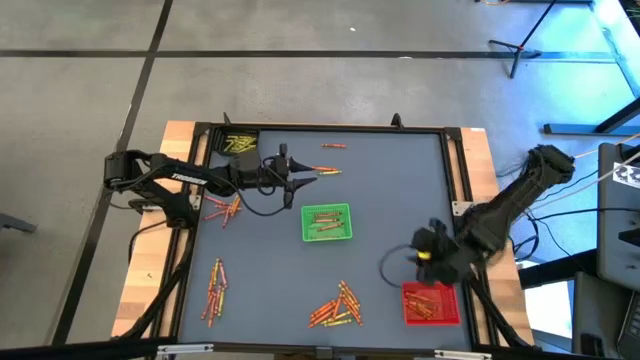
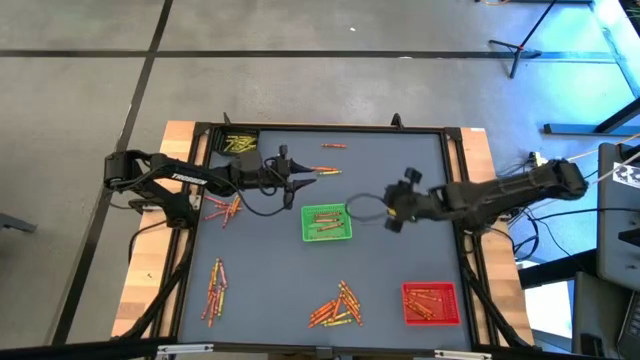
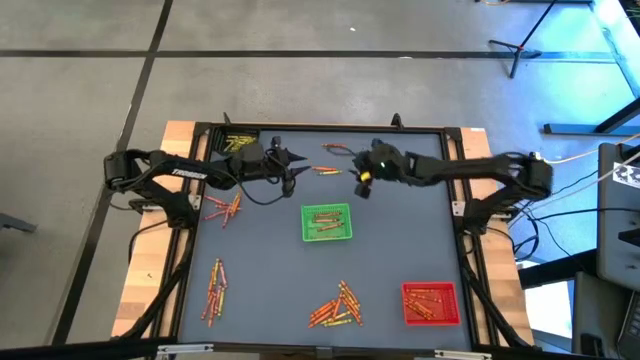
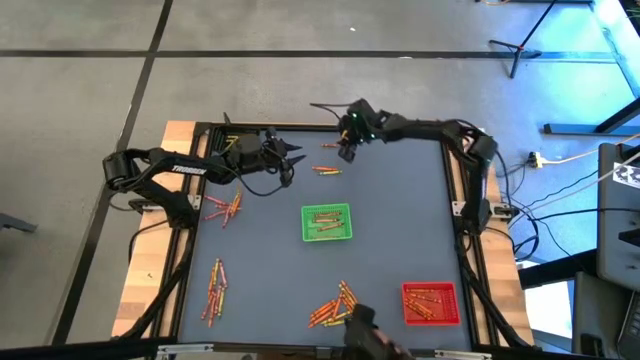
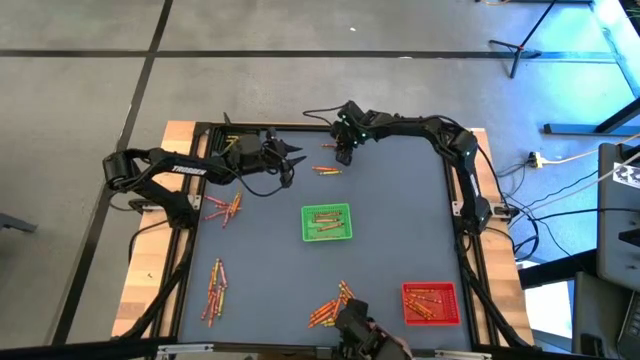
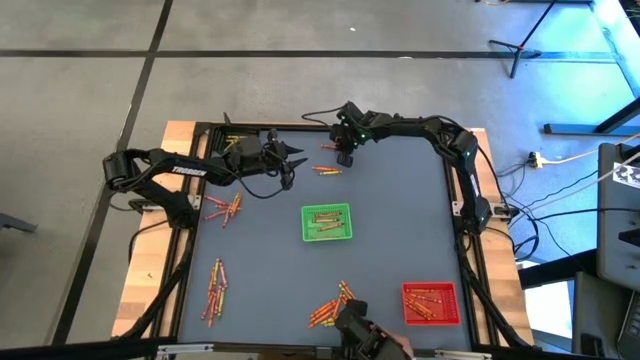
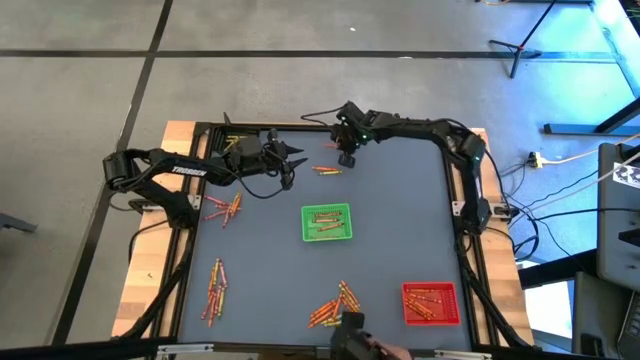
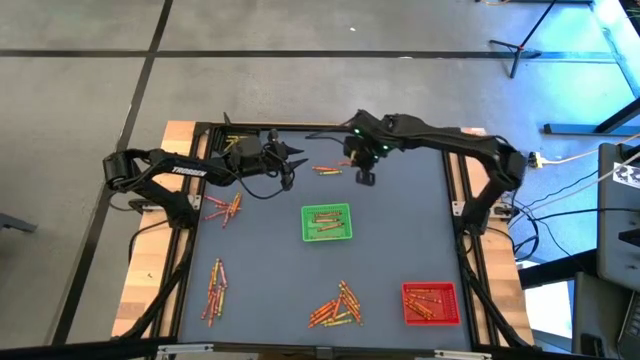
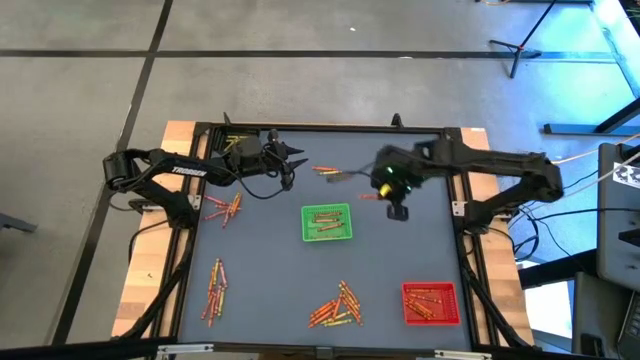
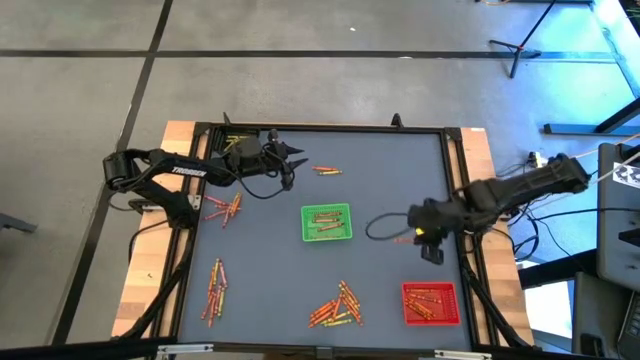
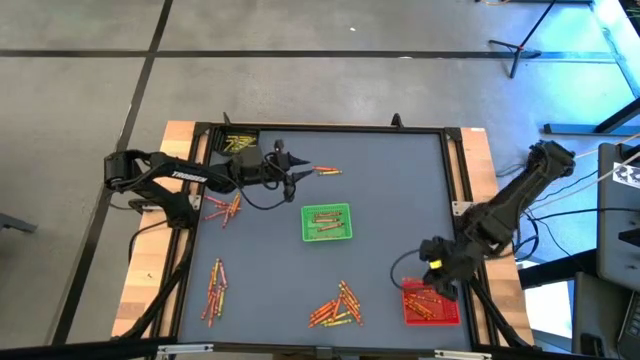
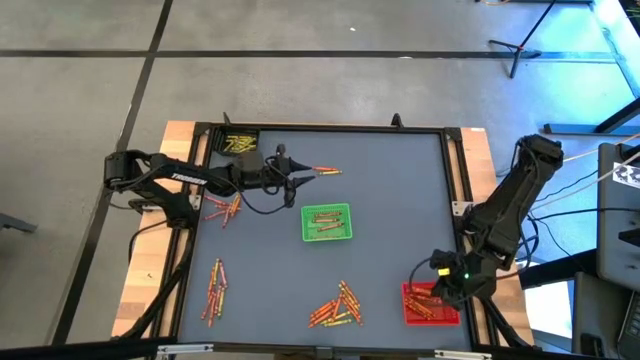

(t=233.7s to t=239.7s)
Task: Sort crayons
Put the orange crayon into the red bin

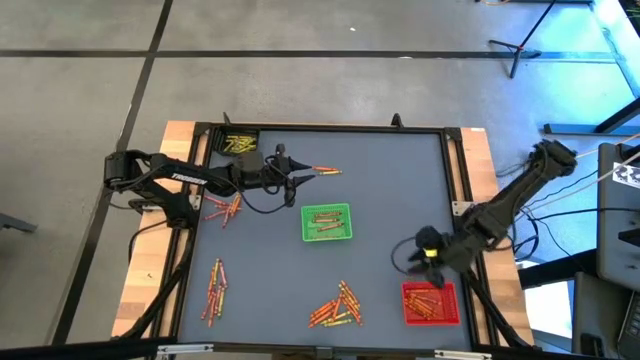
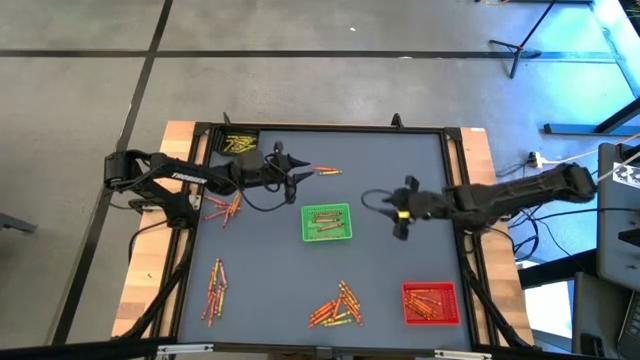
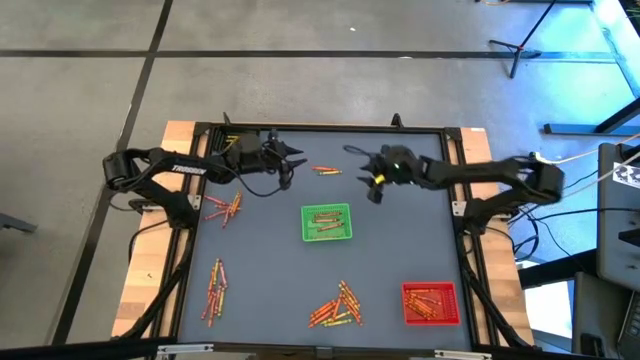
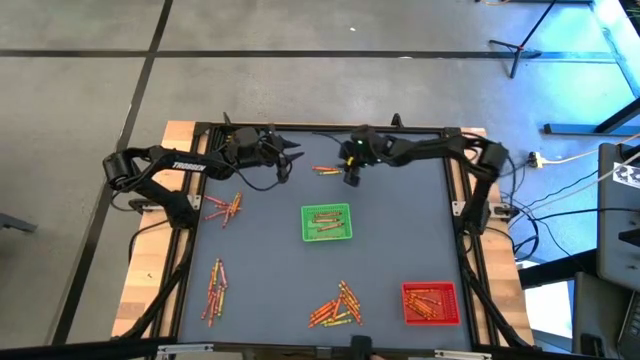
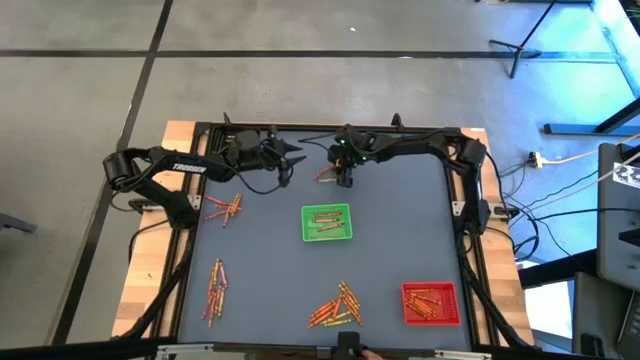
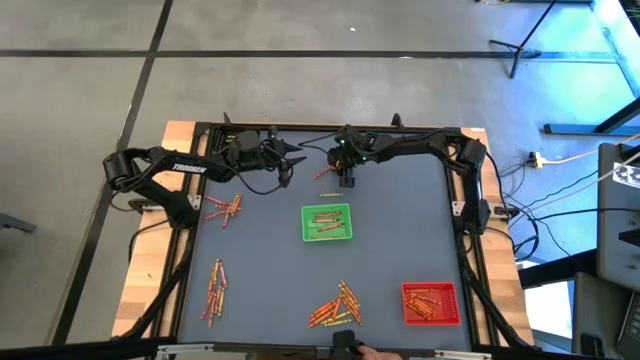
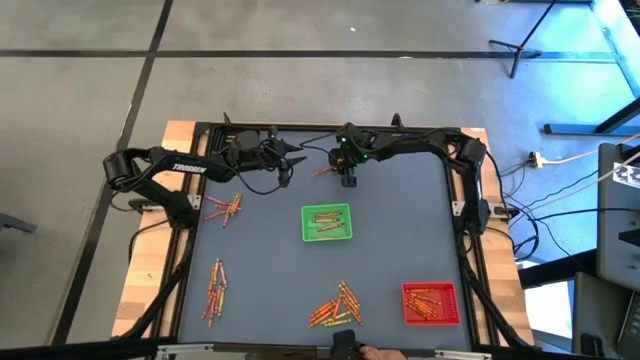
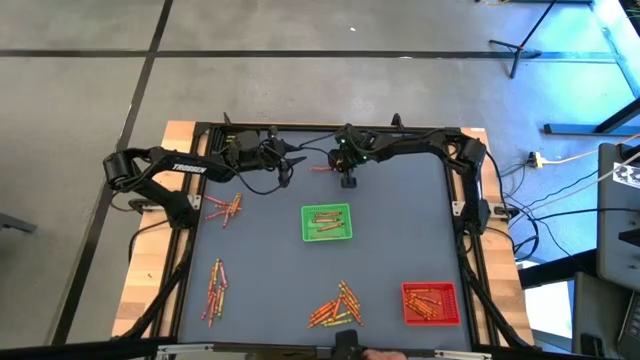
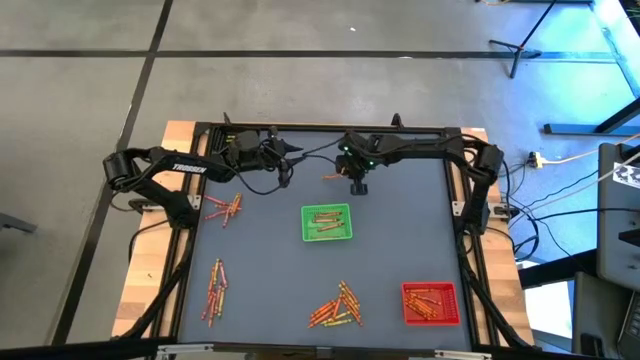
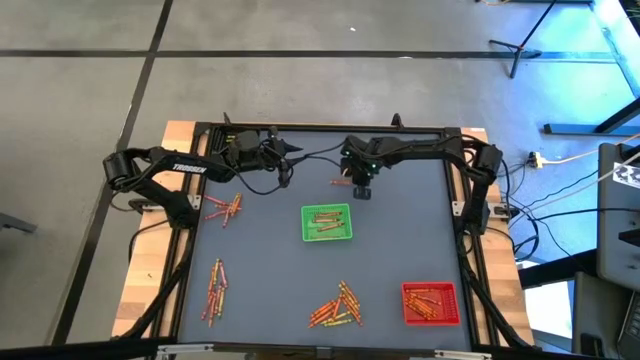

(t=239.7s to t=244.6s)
Put the orange crayon into the red bin

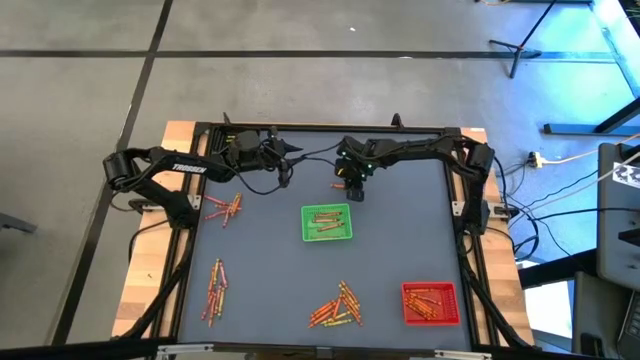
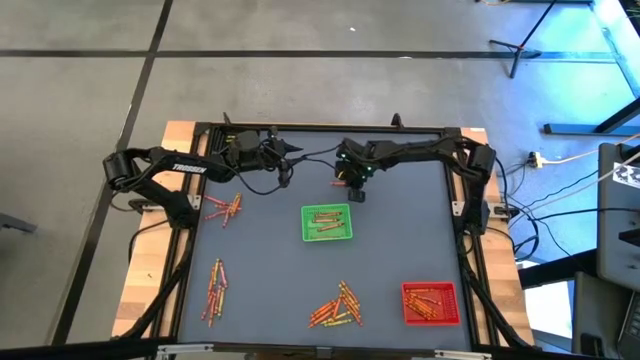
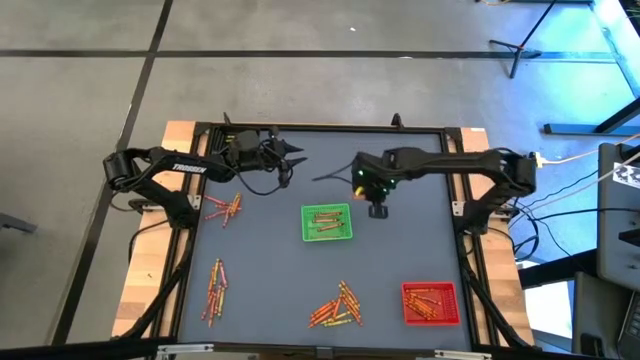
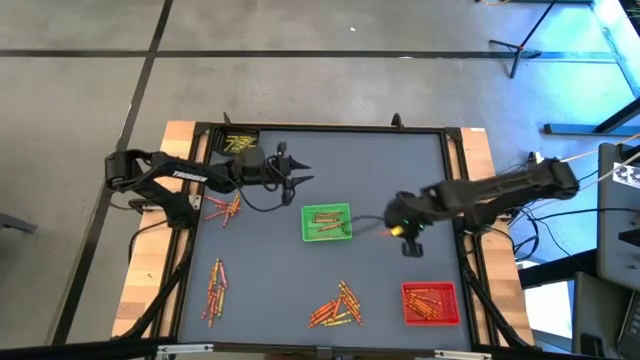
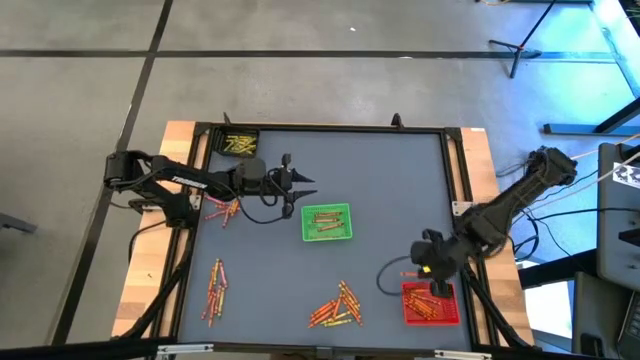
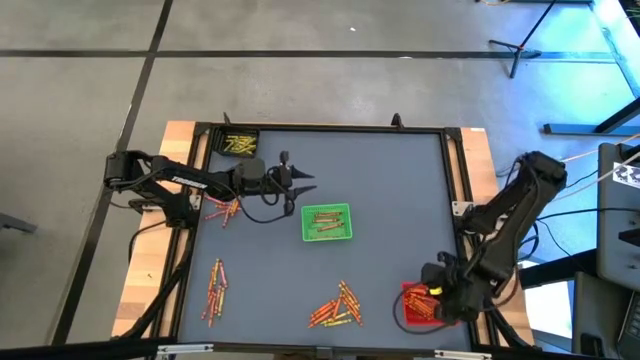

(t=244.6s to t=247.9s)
Put the orange crayon into the red bin

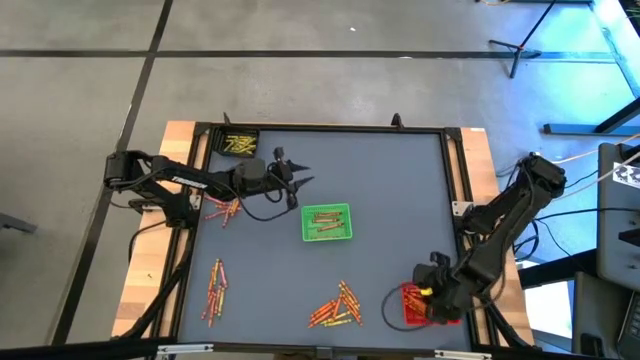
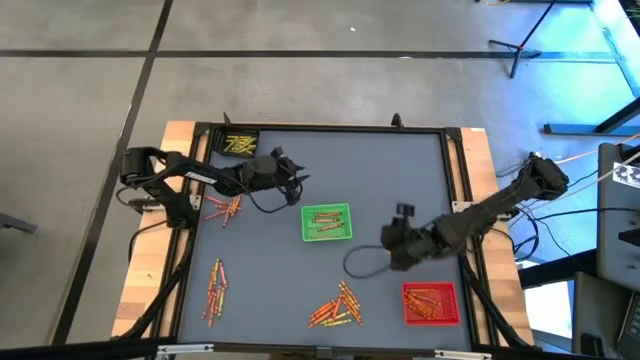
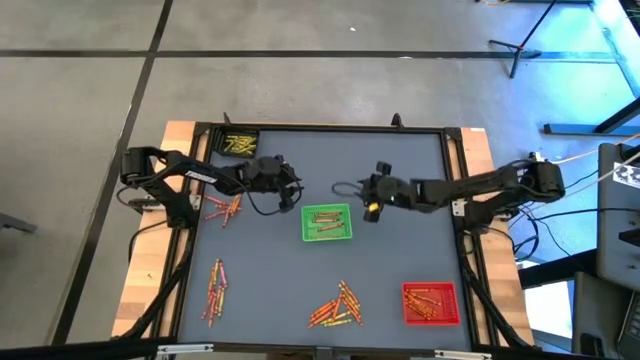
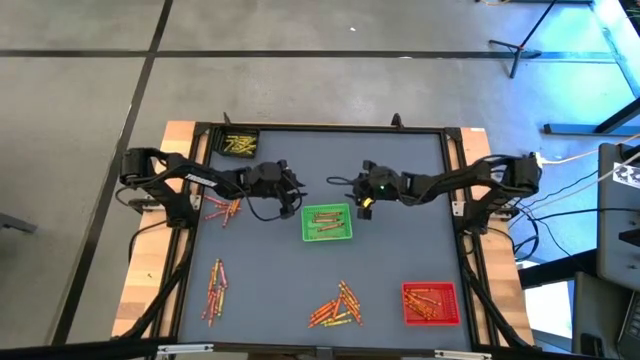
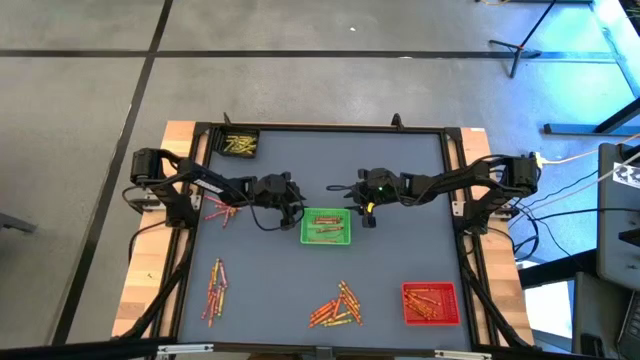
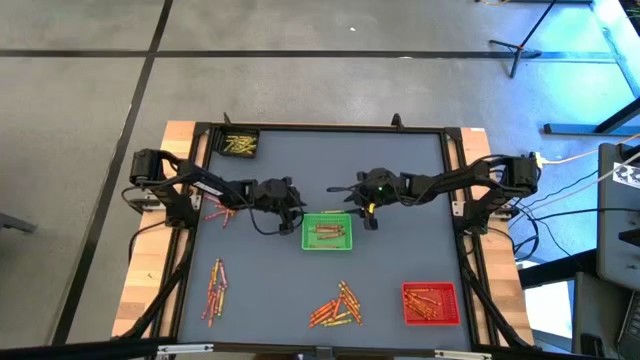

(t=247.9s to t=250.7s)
Adjust the green bin

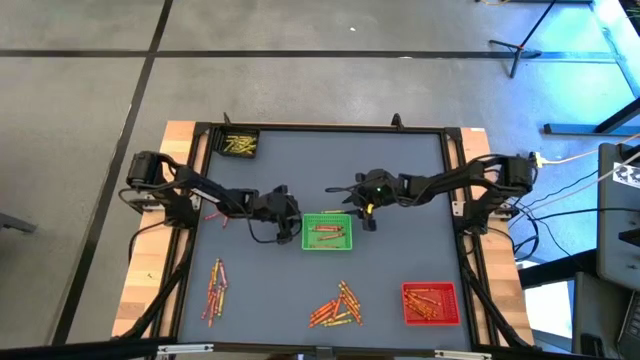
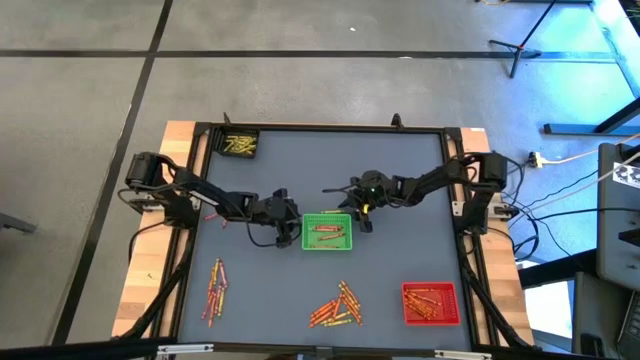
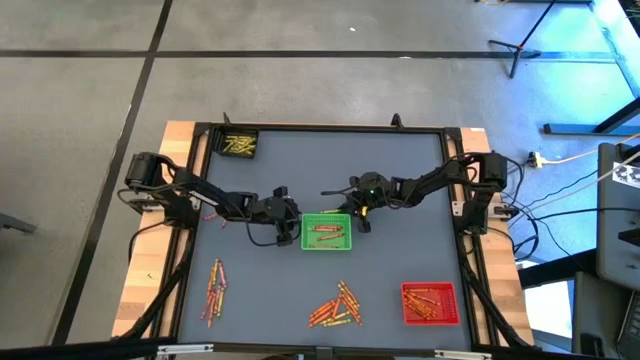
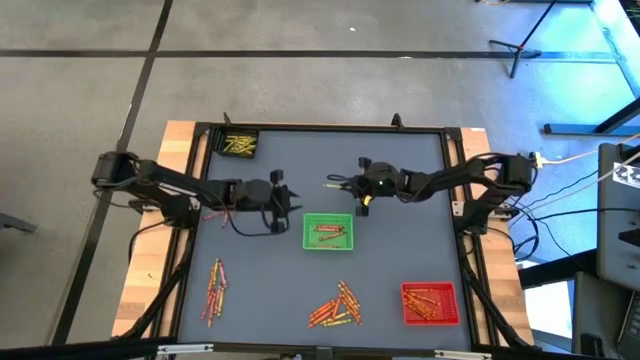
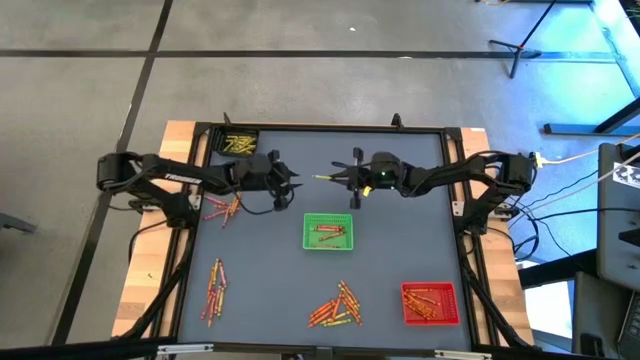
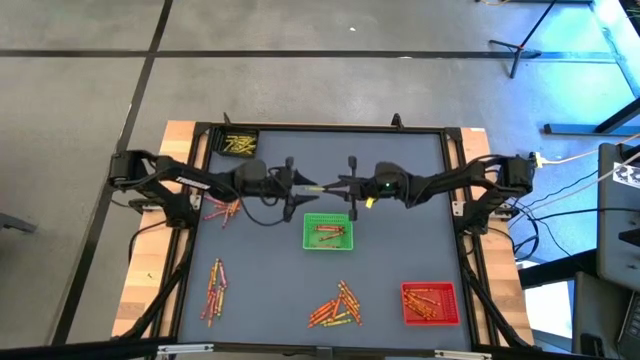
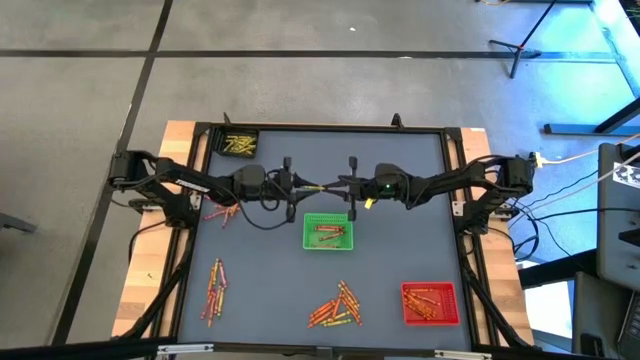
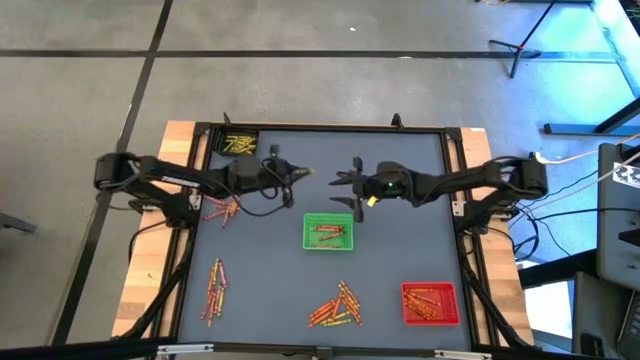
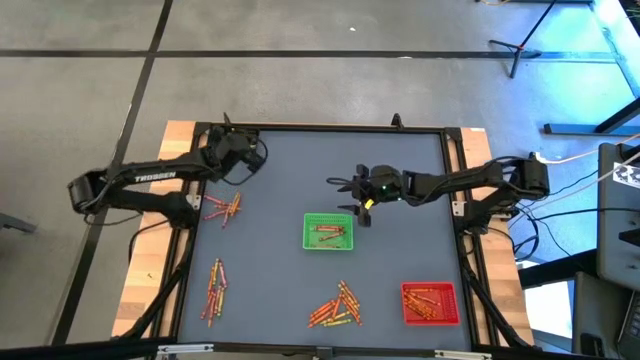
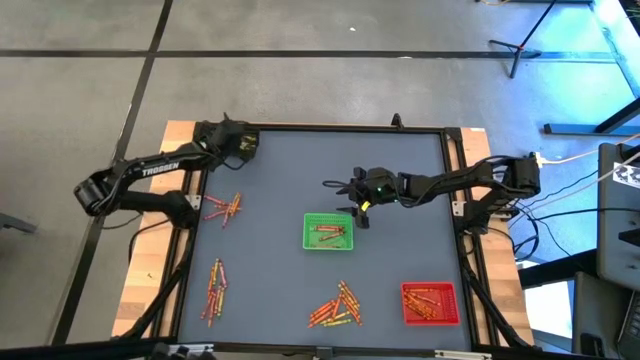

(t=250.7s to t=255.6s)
Put the green crayon into the black bin
